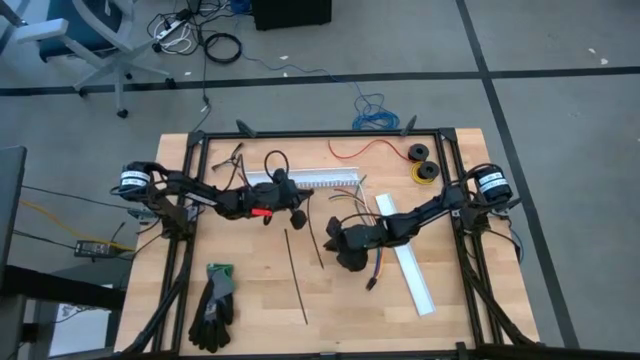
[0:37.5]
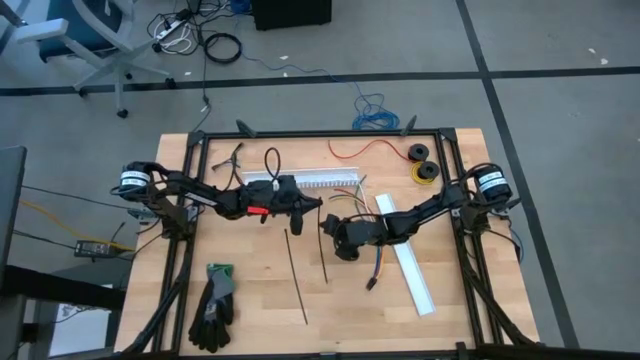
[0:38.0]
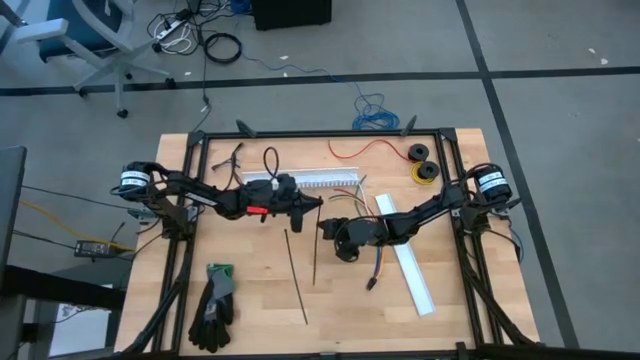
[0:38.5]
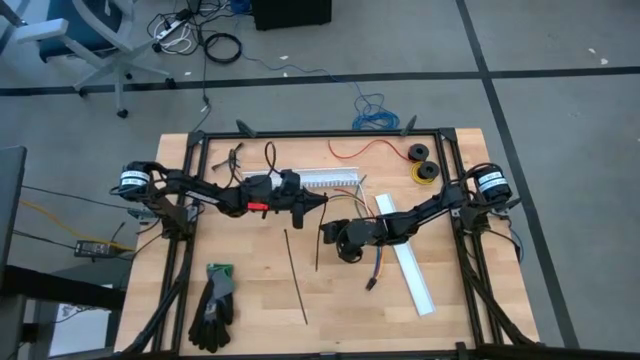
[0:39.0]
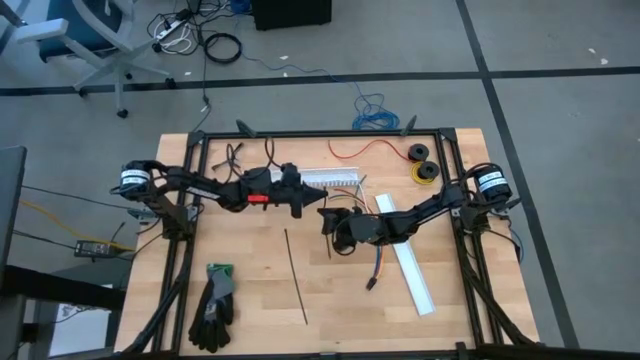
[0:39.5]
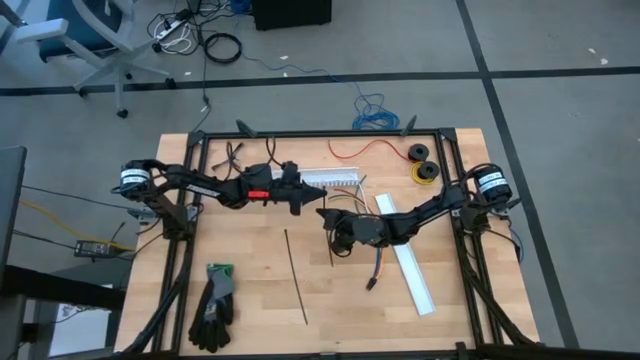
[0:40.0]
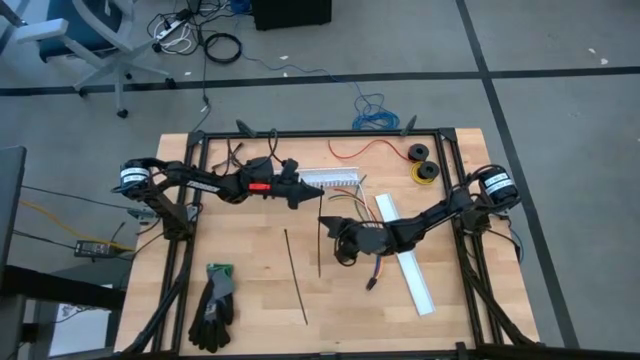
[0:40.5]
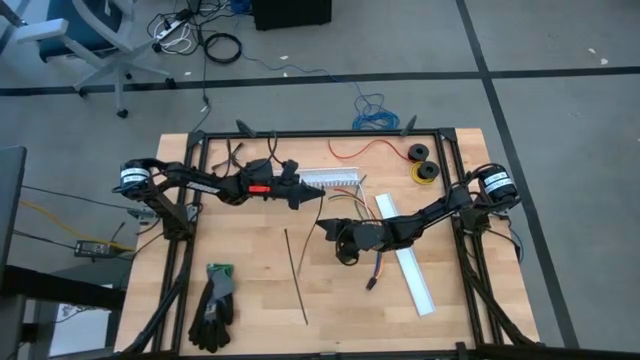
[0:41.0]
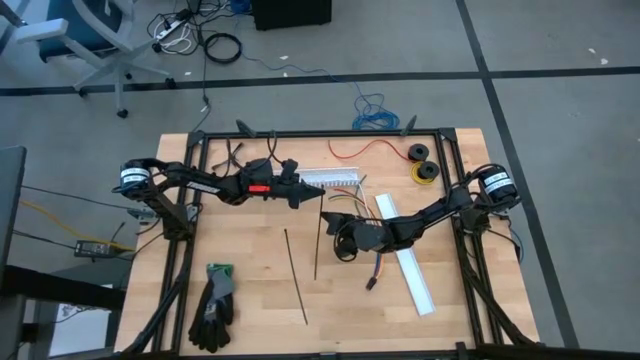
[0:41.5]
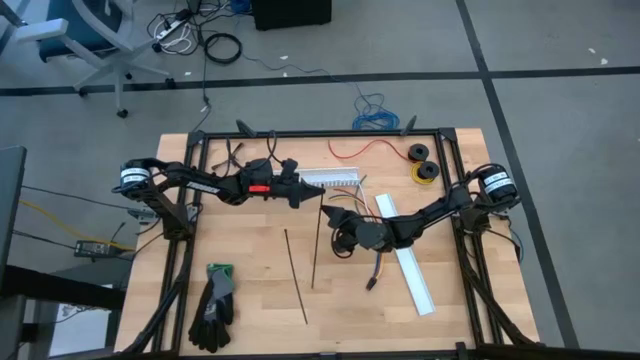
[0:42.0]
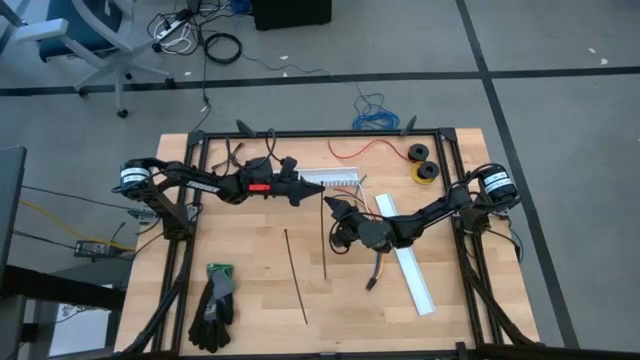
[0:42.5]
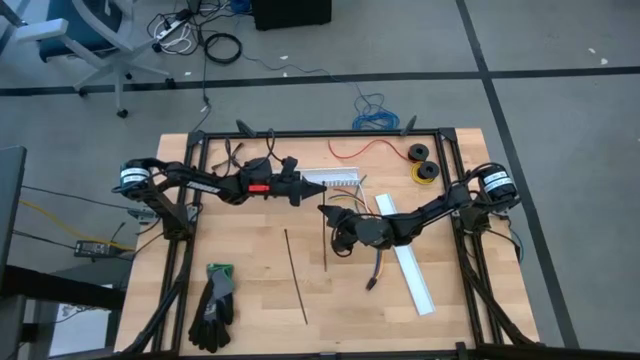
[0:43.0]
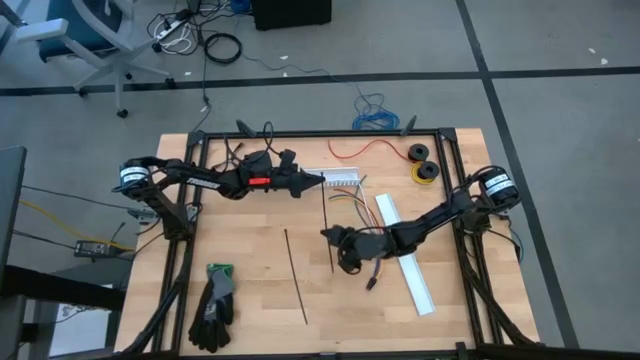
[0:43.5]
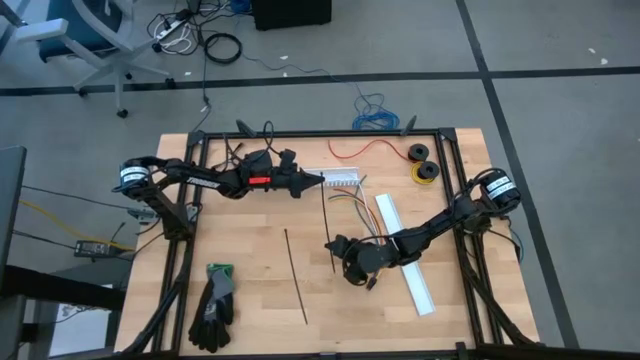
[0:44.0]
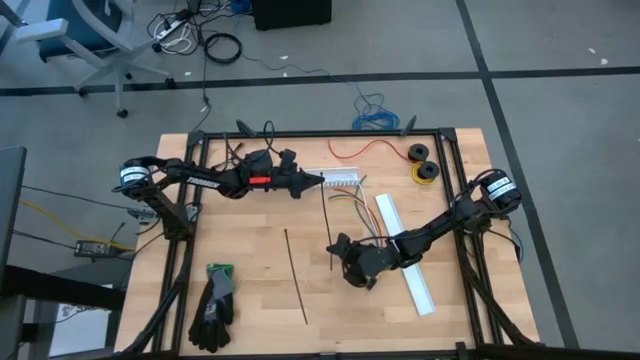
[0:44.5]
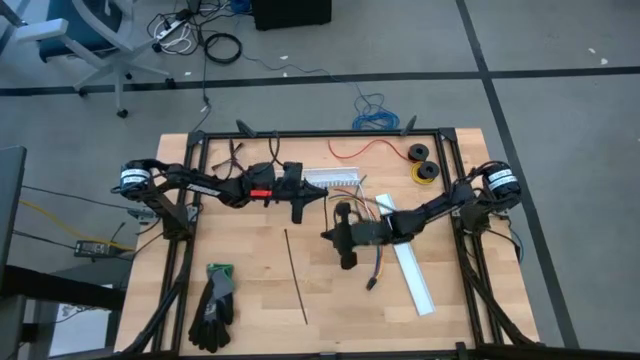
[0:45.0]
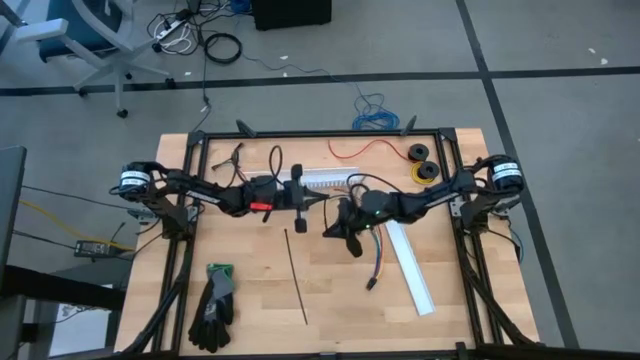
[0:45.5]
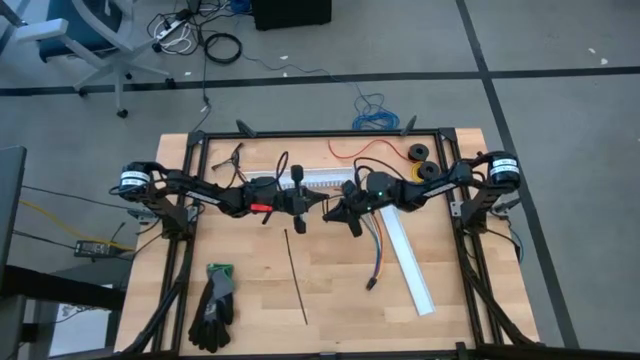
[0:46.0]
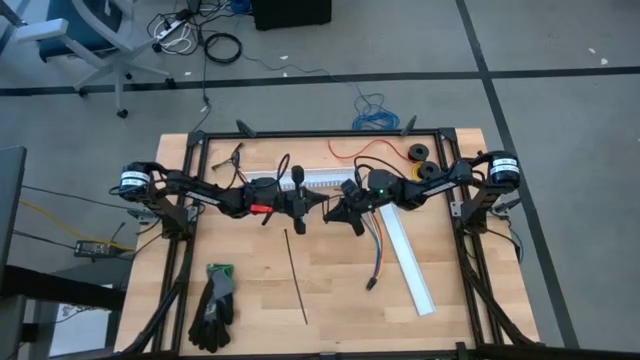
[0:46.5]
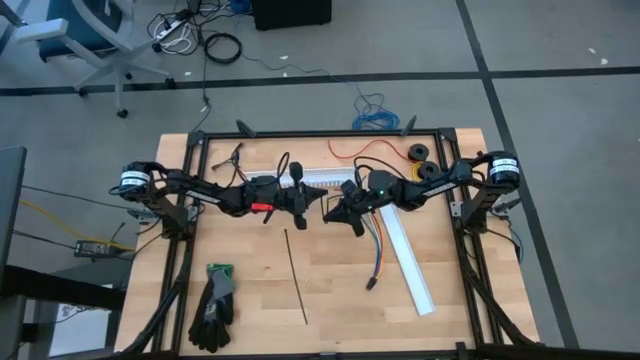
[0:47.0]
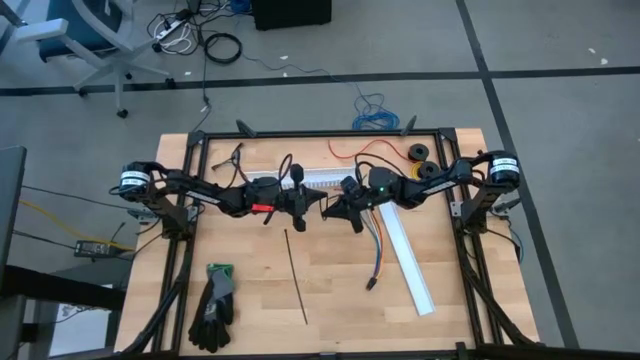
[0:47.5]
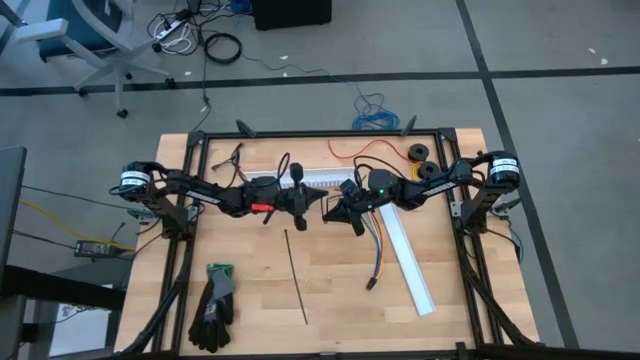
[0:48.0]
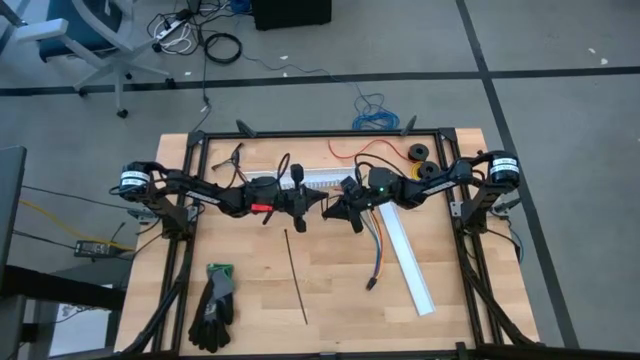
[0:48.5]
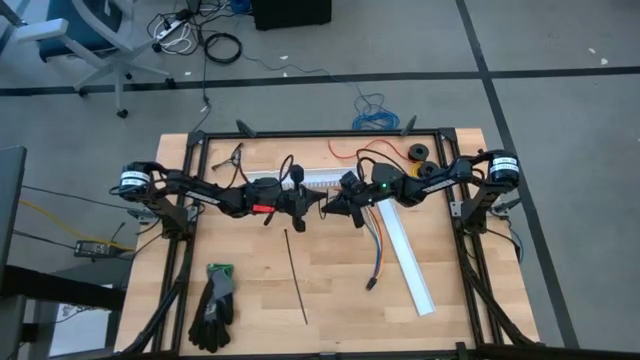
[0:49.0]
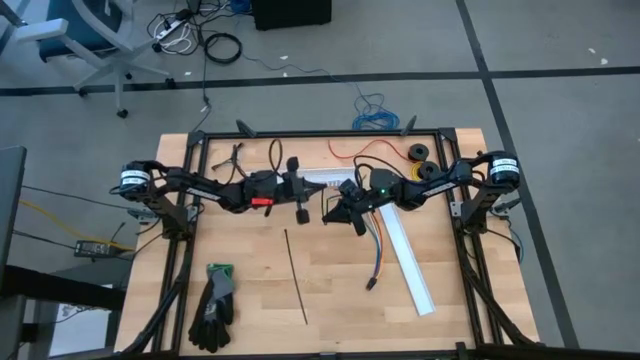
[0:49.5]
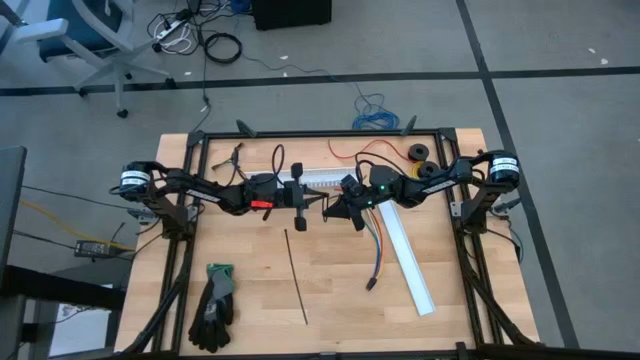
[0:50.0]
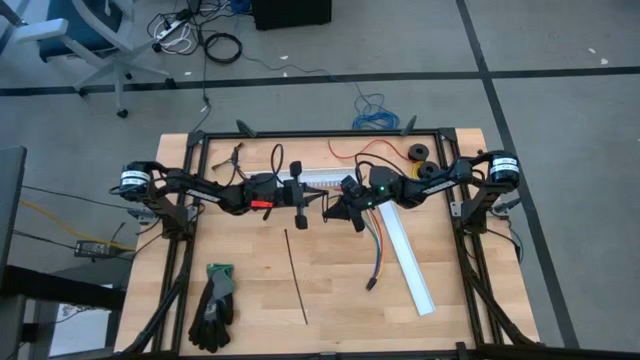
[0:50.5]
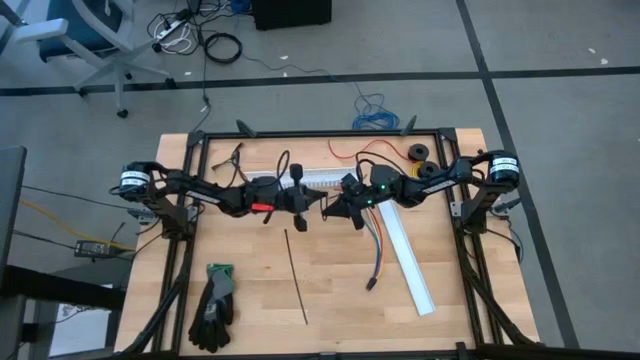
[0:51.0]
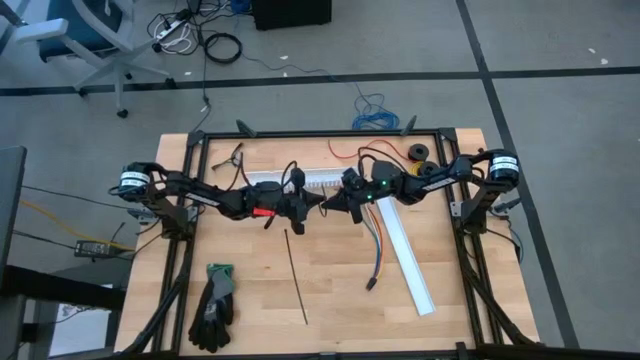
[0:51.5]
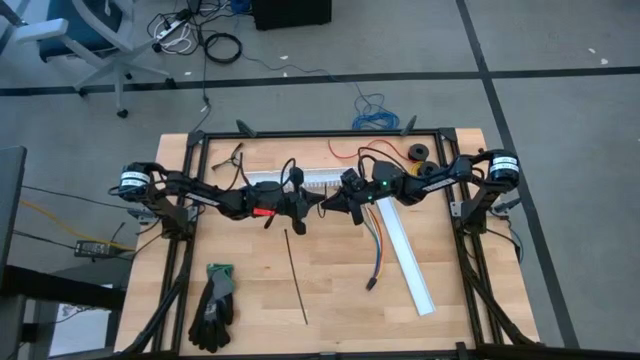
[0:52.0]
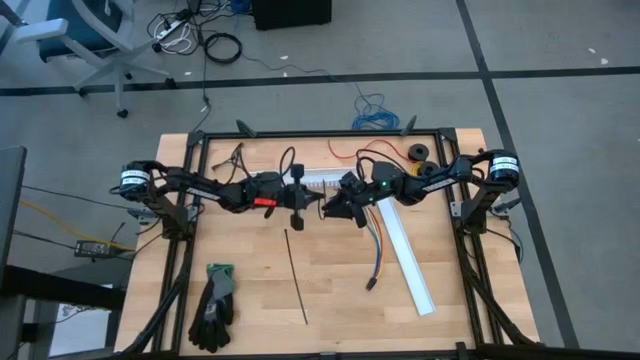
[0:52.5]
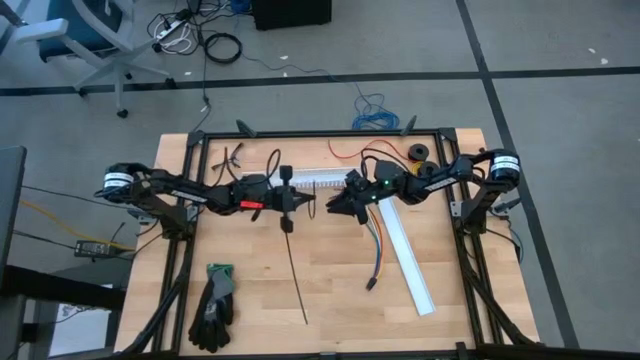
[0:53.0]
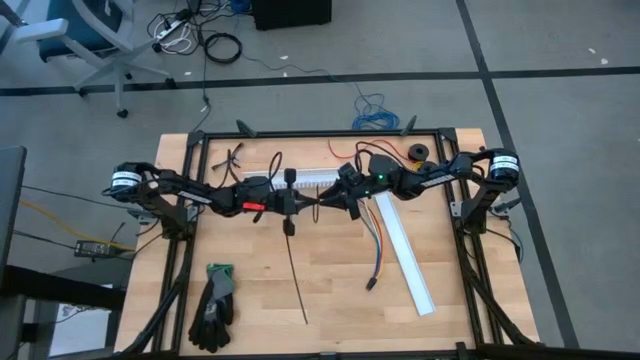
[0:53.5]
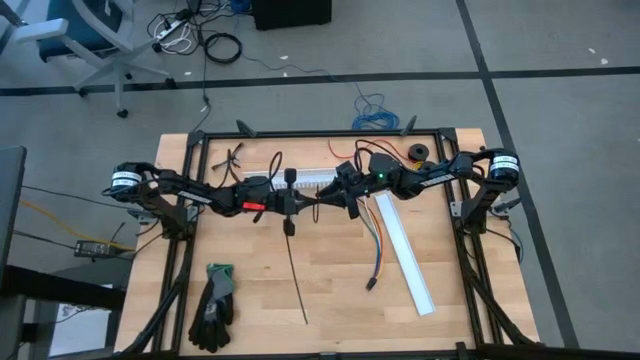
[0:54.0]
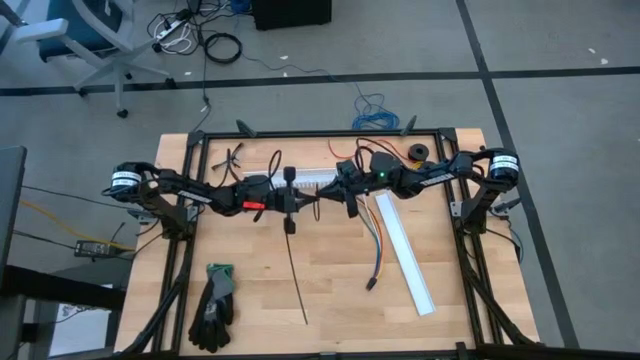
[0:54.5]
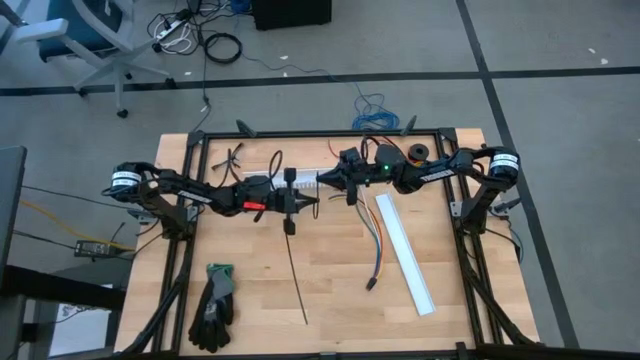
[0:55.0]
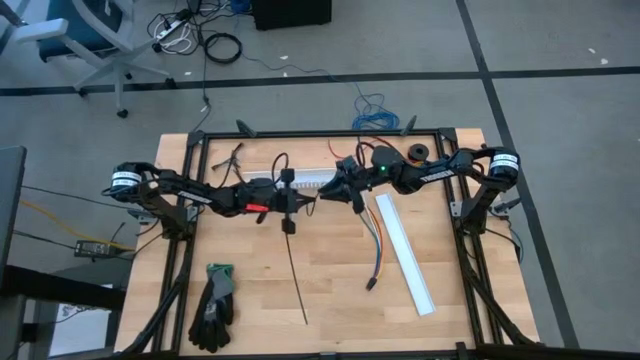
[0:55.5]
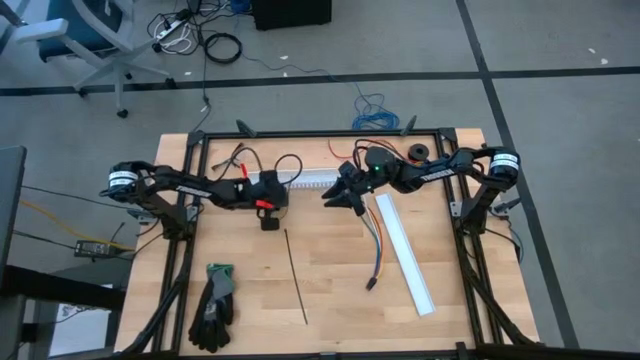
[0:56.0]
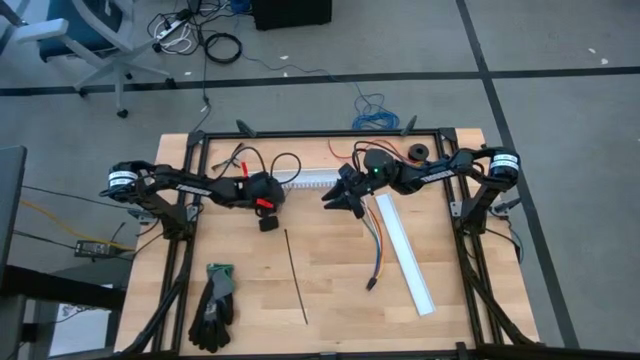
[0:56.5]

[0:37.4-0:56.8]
Task: Ziptie cables
Prepare the black zip tie

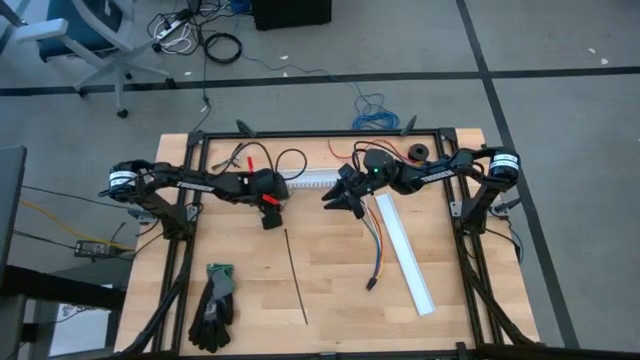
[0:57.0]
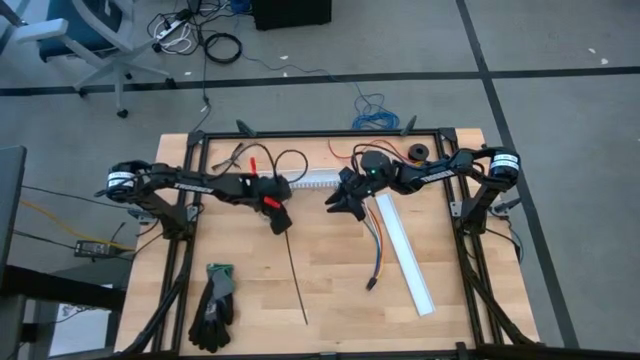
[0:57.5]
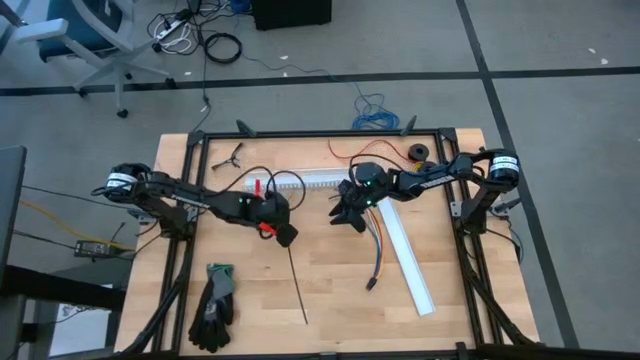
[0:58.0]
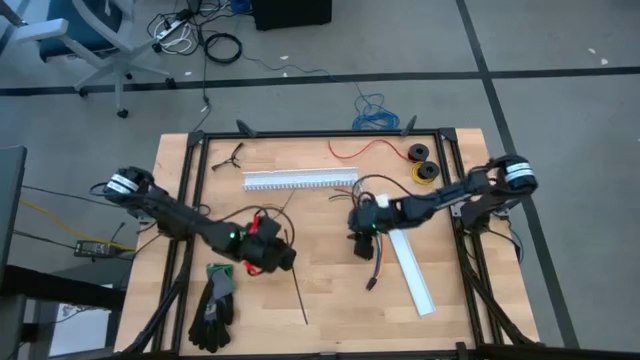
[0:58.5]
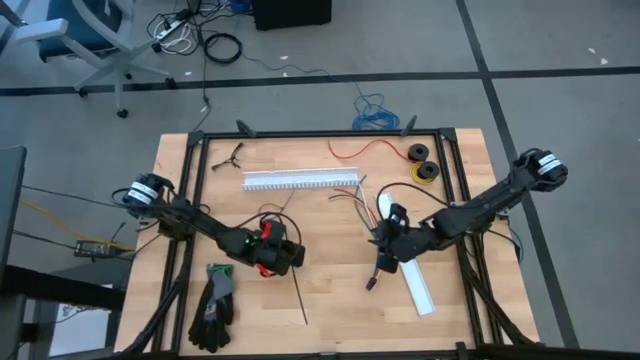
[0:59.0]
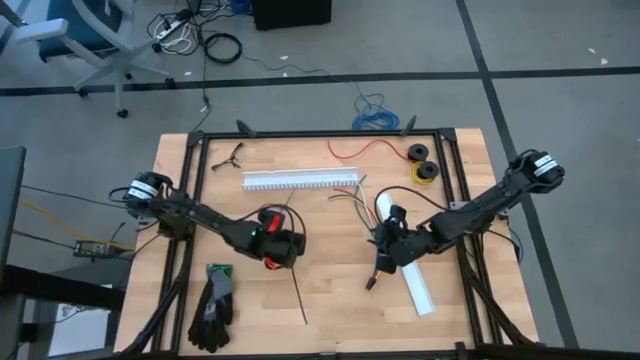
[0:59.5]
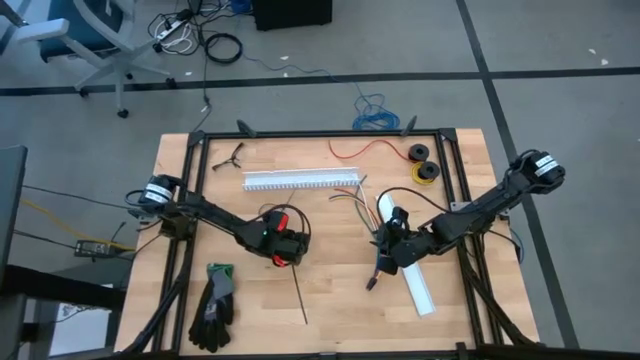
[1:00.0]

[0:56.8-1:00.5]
Wrap the cable wires with black zip tie
